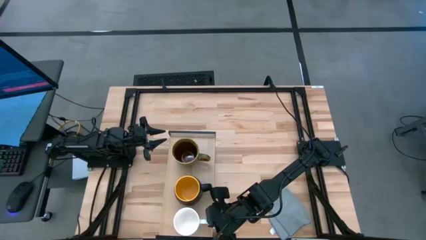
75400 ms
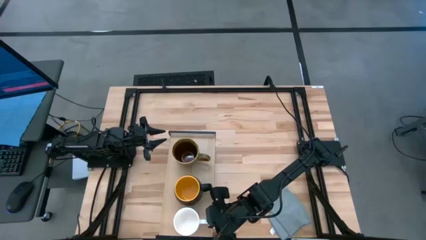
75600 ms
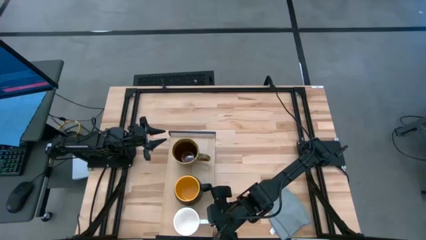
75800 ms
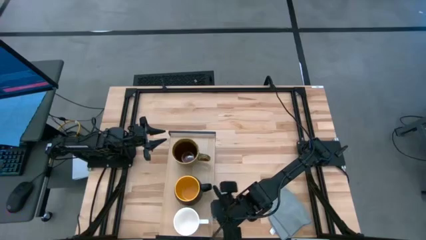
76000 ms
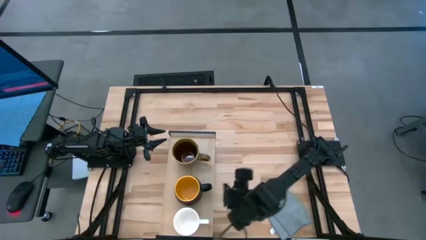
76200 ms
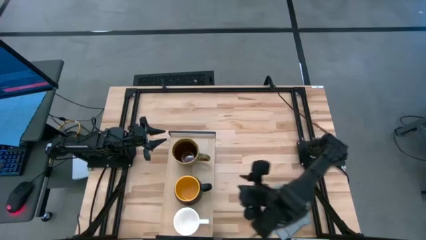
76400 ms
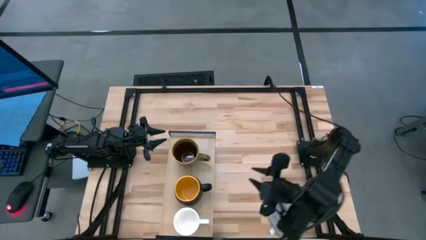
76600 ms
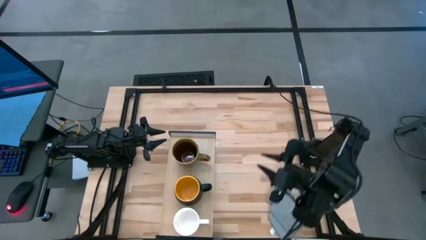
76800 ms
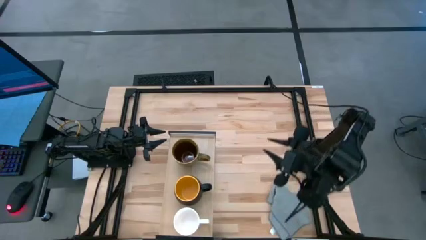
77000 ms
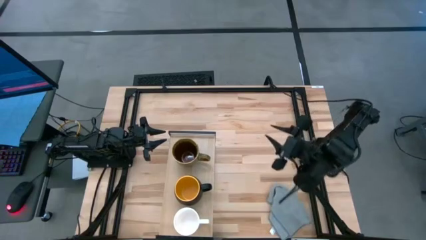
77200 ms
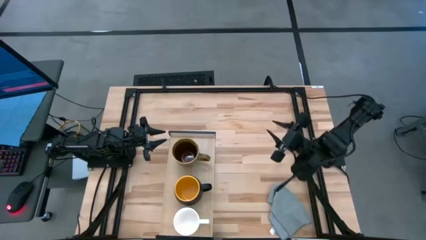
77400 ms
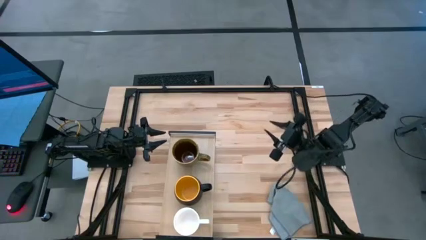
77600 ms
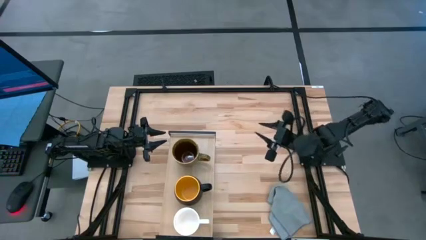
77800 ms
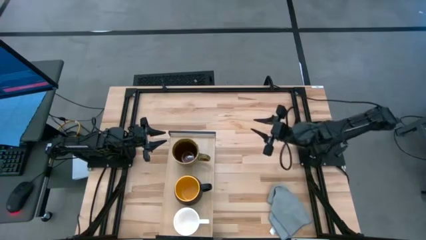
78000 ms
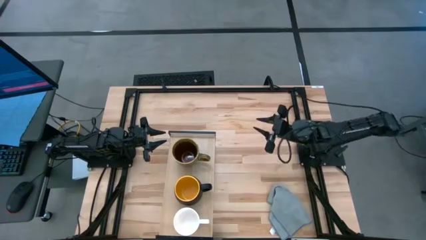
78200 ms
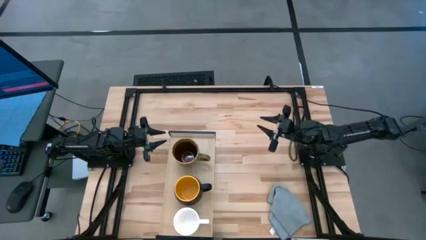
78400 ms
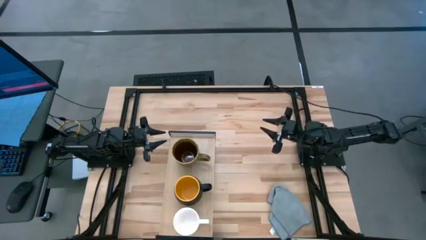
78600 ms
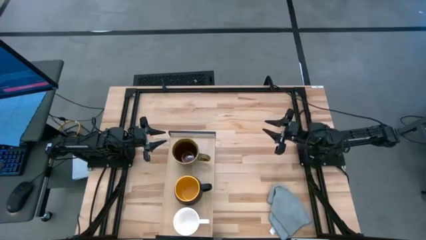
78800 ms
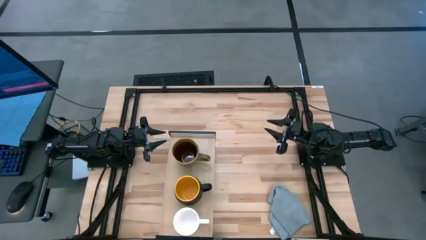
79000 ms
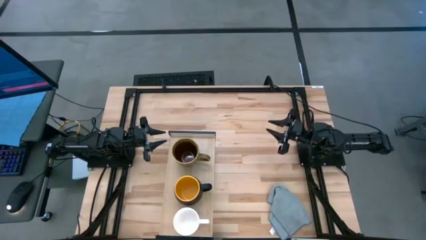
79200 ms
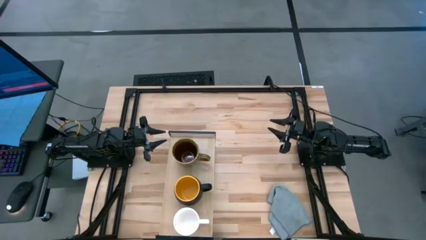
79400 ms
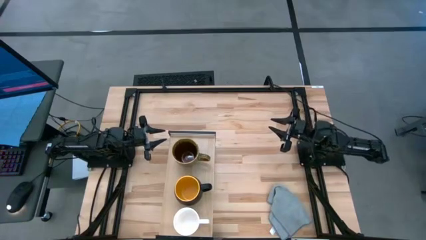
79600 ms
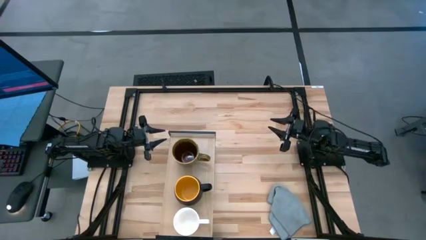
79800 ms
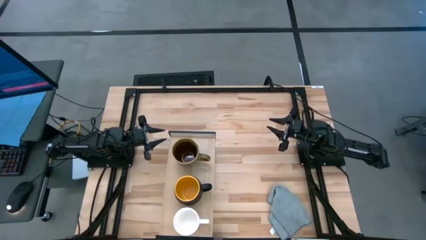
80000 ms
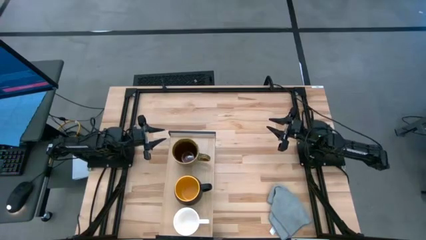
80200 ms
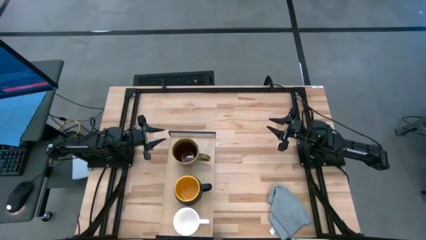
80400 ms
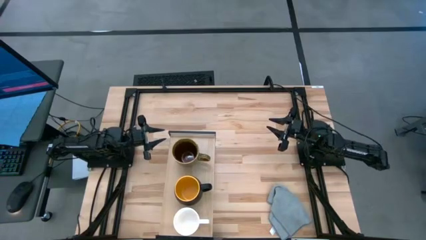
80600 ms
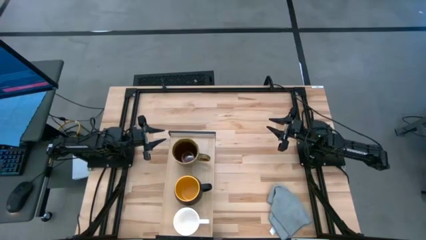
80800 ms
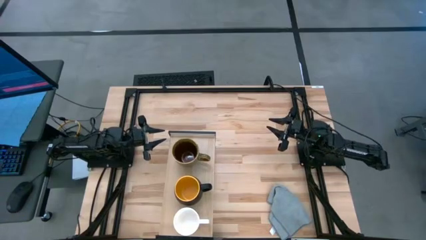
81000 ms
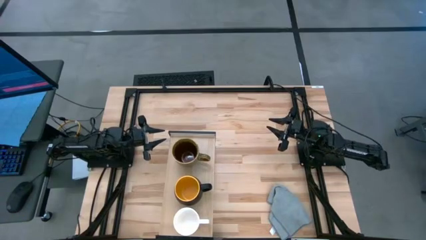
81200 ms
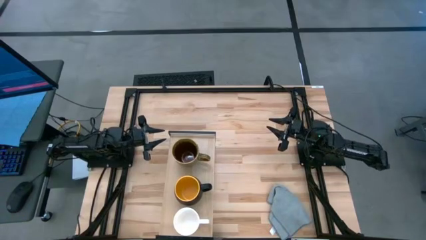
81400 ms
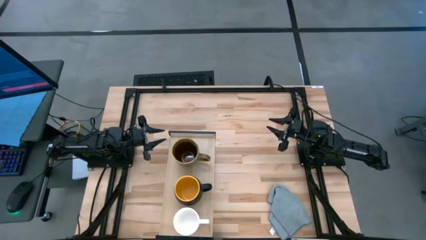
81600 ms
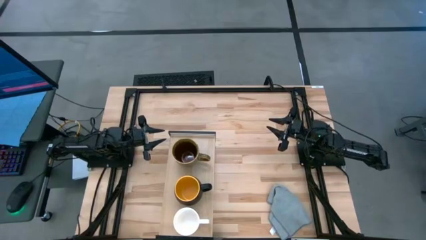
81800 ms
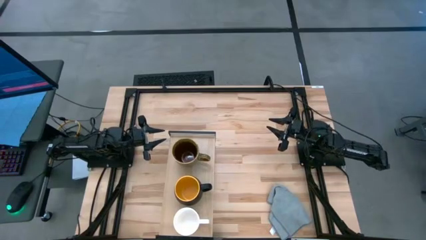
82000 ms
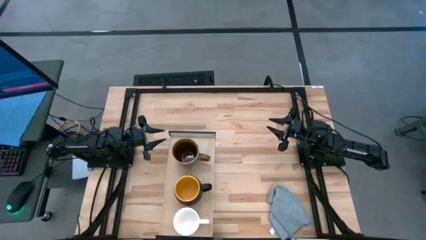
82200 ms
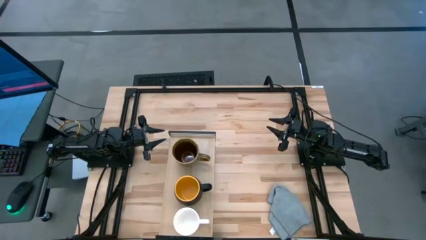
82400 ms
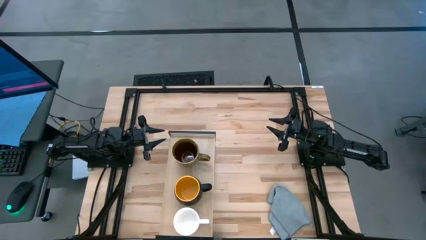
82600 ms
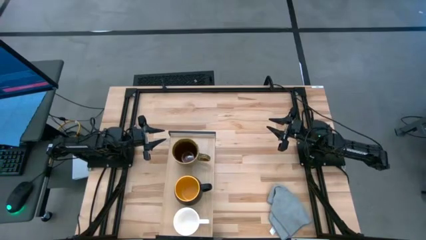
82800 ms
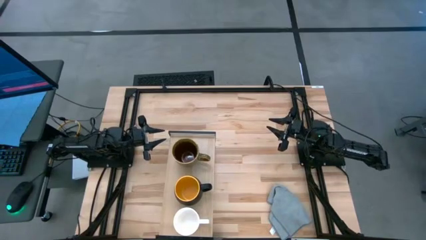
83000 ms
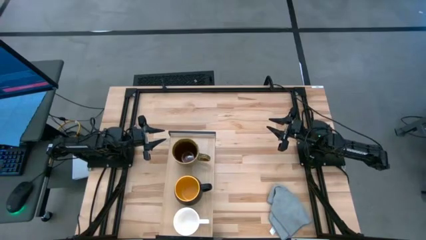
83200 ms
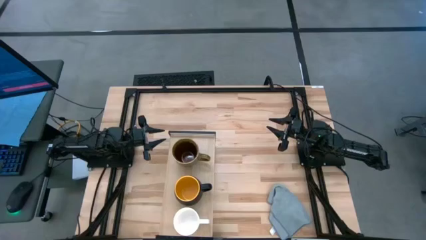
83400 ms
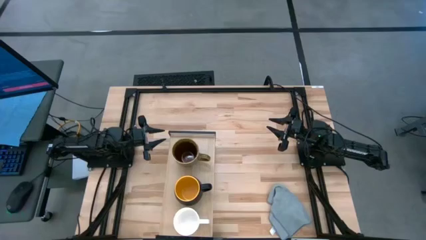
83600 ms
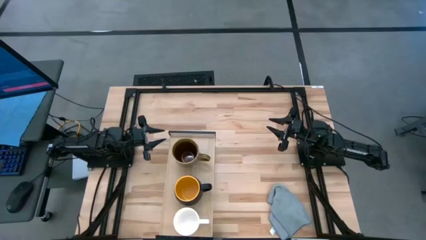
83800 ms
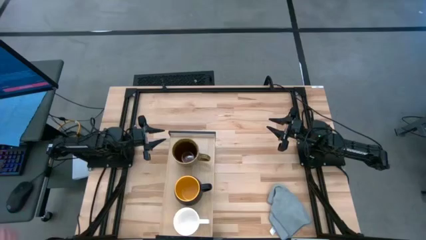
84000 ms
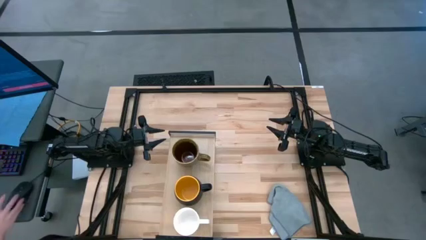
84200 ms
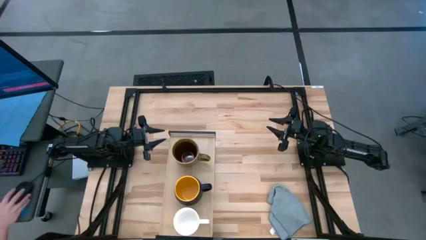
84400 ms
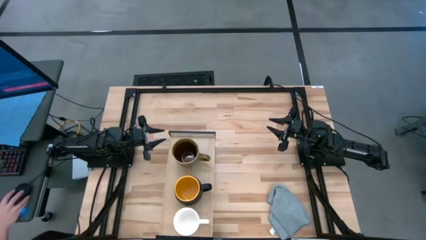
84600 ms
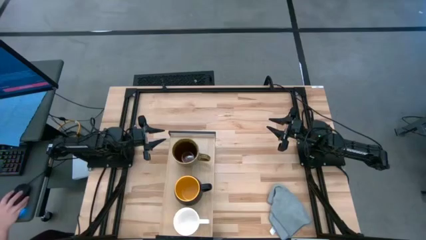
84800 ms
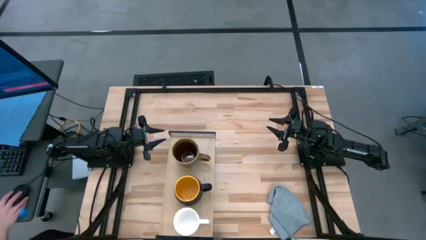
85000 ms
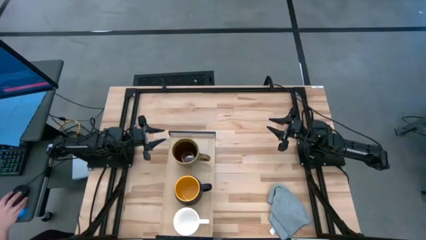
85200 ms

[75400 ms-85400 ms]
Task: Stack small to large cups/mugs on shelf
Return to Home Position

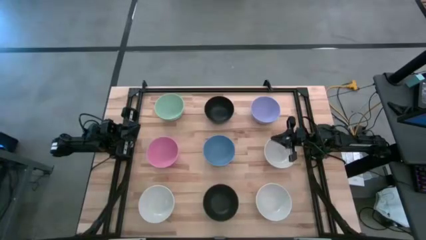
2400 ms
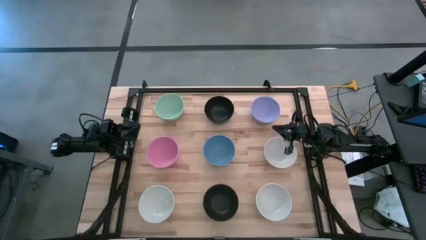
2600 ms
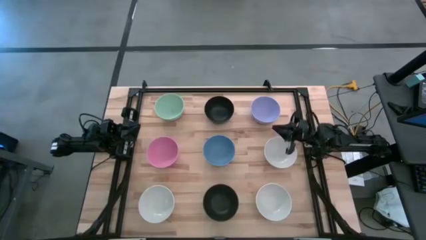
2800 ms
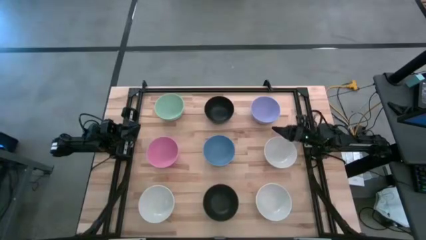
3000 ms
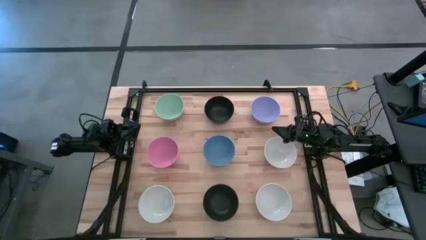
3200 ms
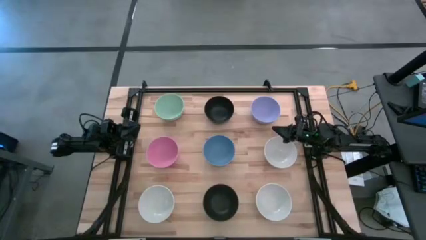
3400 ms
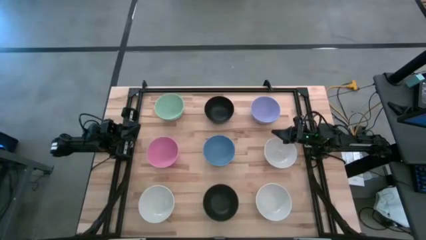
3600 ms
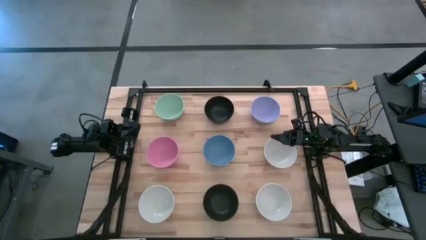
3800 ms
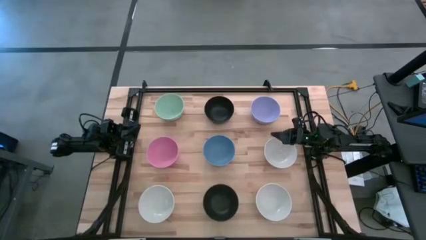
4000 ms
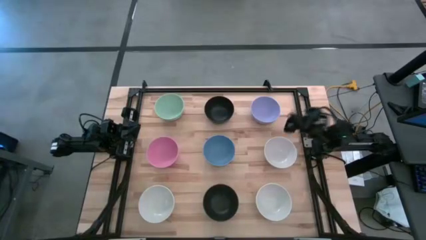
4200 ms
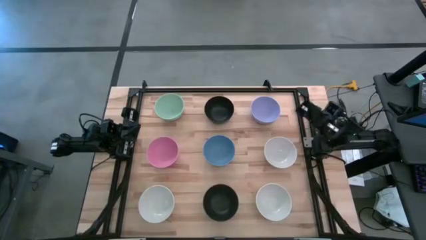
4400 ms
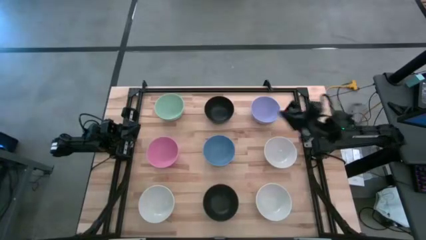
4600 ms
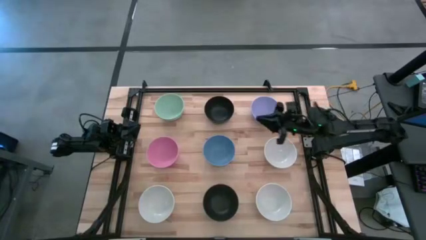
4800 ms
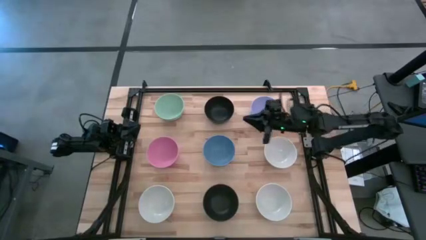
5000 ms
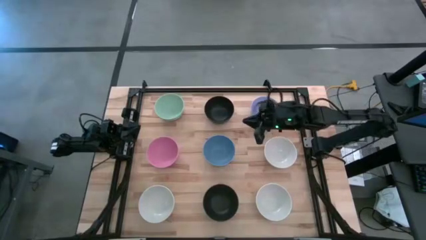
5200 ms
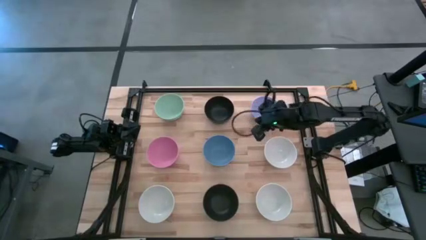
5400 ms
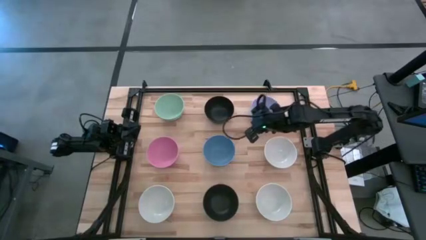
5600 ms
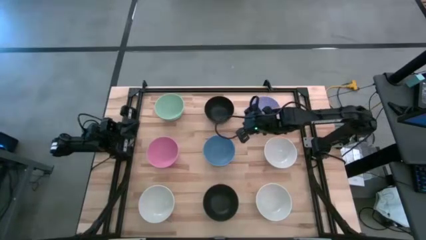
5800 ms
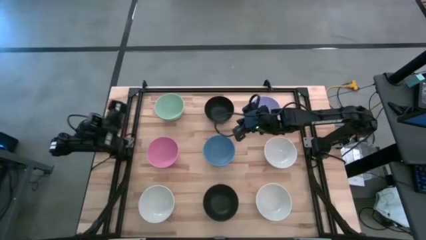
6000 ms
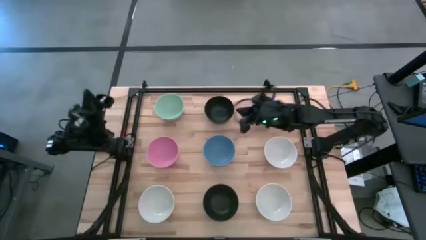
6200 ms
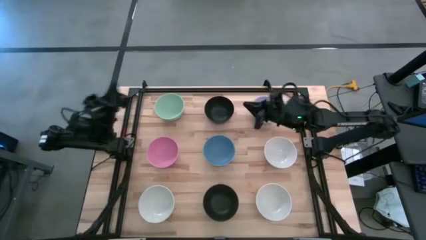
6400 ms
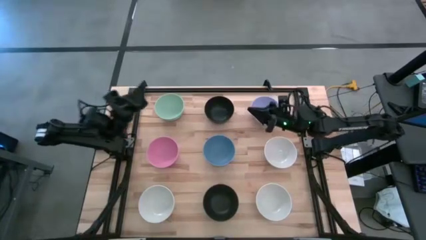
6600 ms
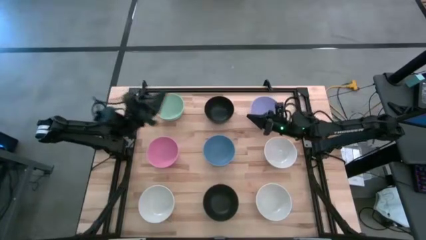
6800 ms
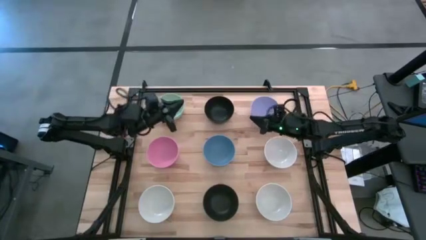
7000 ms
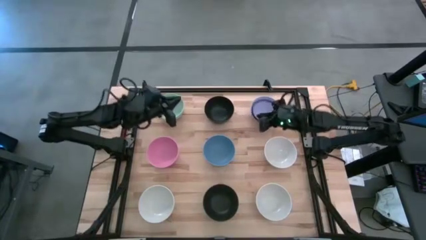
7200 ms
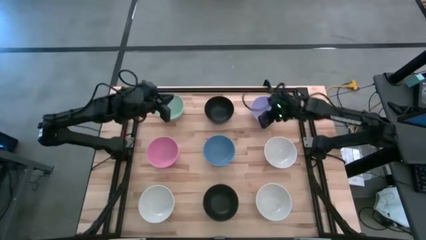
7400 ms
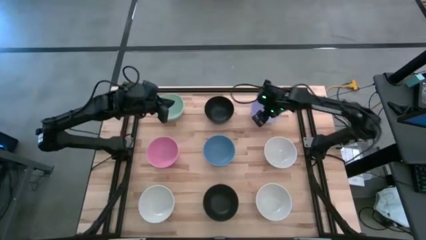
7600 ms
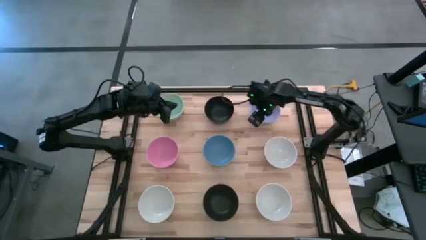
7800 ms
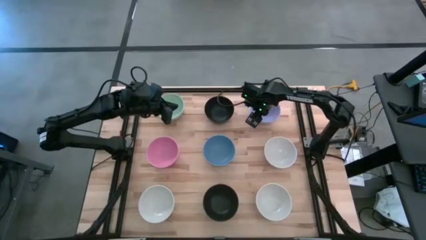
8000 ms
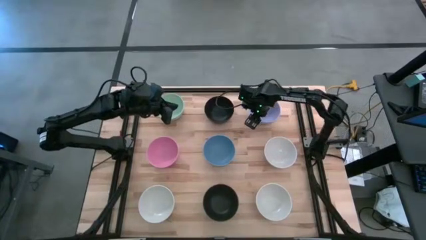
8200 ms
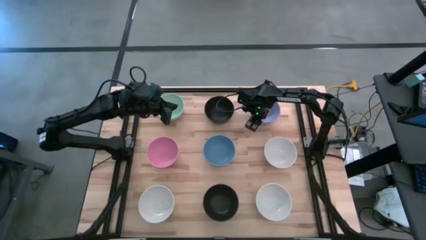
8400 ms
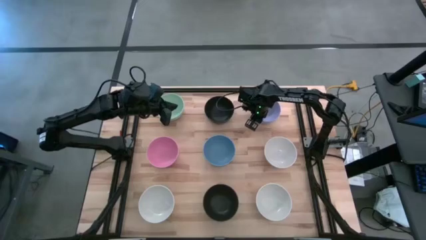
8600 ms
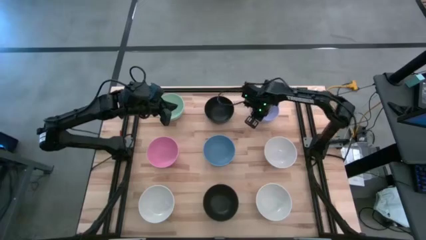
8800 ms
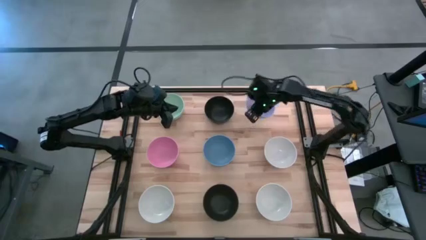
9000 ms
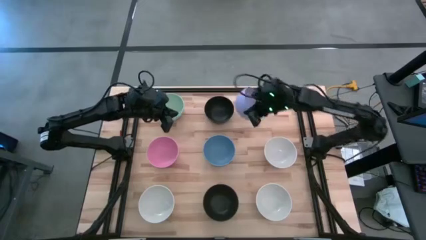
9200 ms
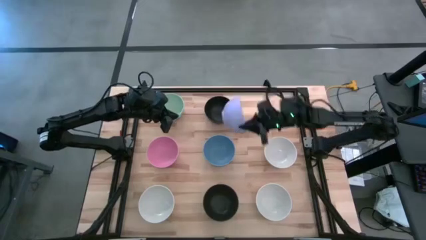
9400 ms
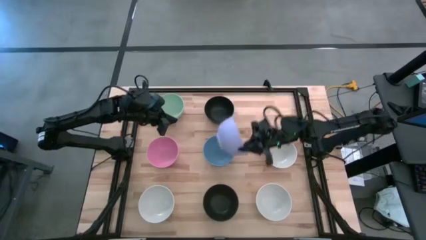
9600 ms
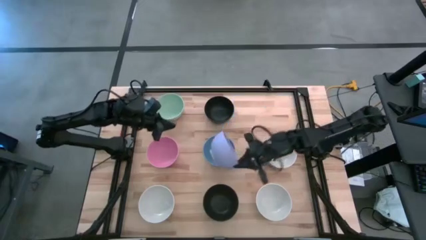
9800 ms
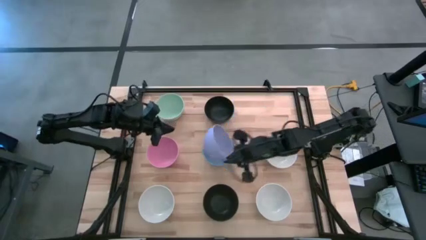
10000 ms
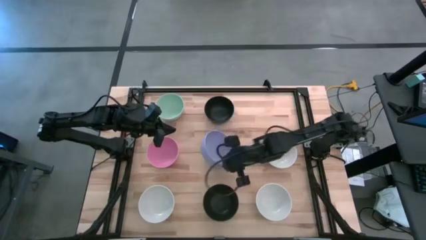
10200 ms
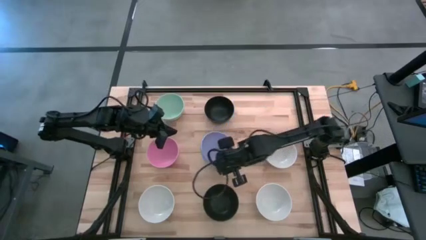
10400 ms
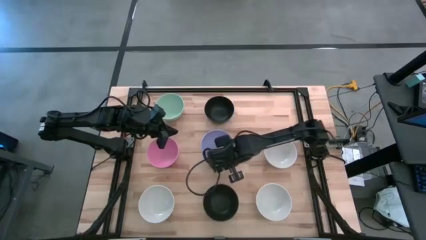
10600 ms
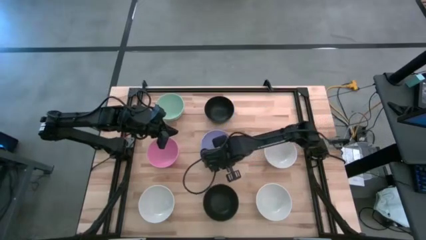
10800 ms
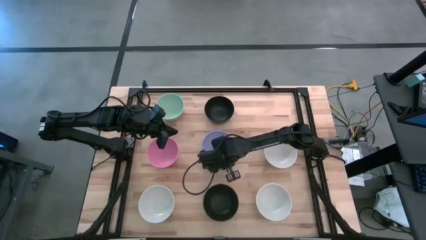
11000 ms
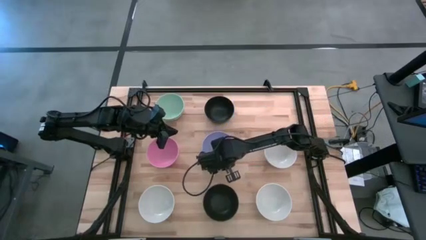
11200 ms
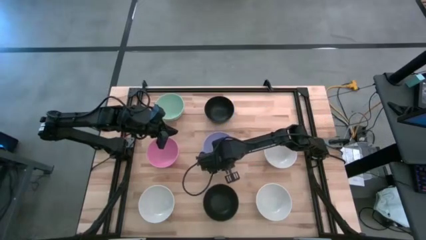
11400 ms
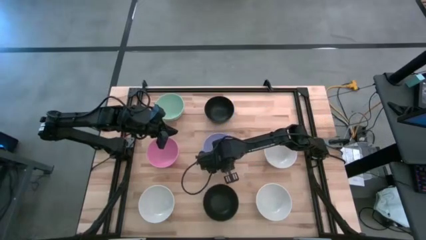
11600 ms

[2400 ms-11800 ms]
Task: Nest bowls inside each other
Stack the purple bowl on top of the blue bowl
